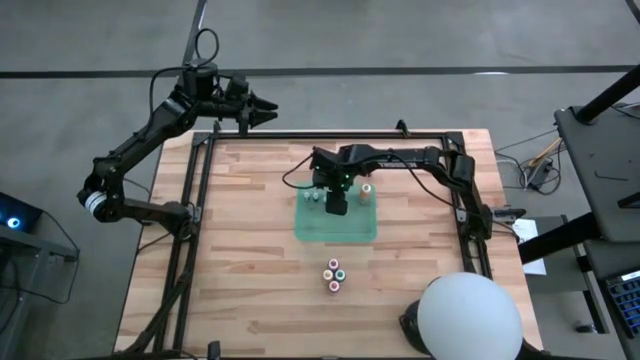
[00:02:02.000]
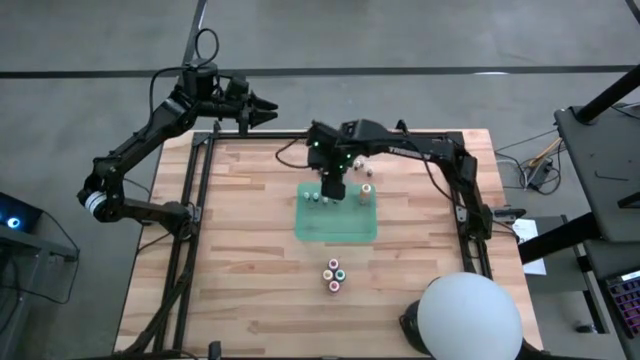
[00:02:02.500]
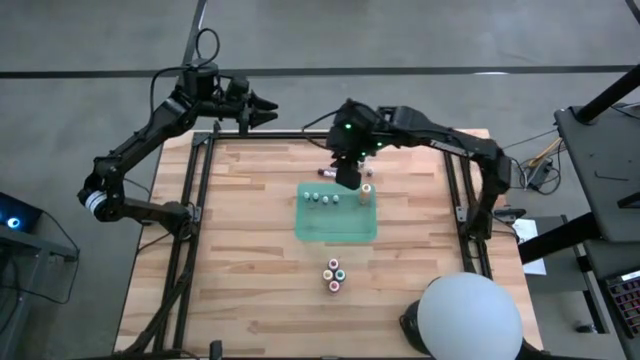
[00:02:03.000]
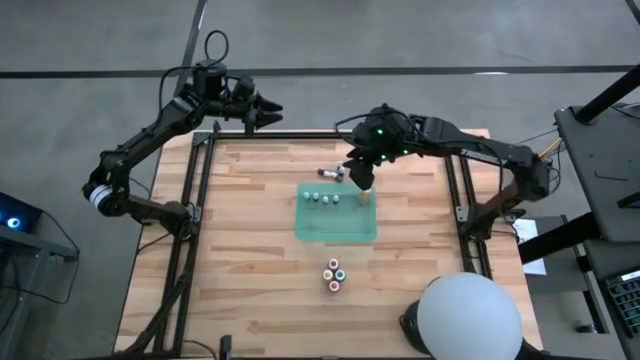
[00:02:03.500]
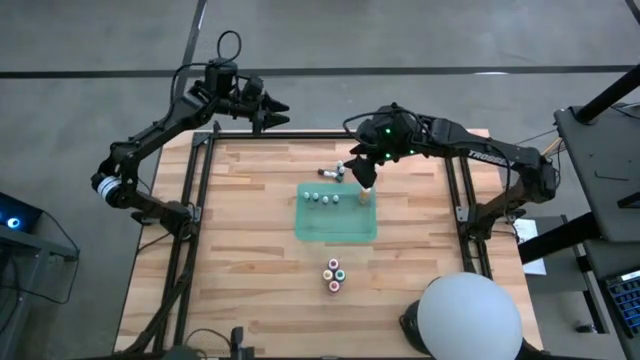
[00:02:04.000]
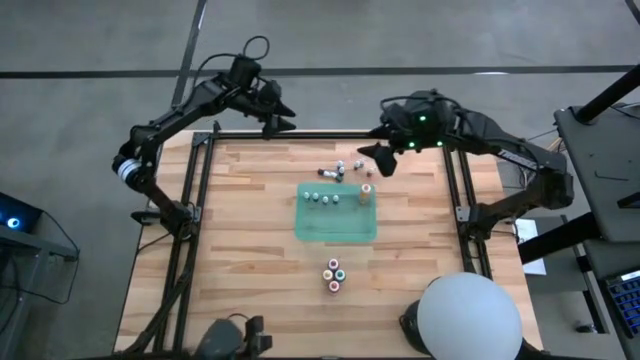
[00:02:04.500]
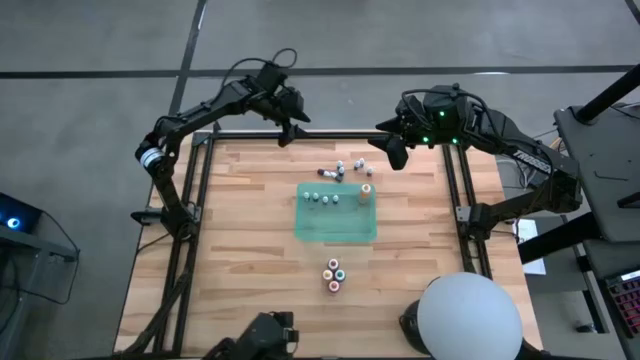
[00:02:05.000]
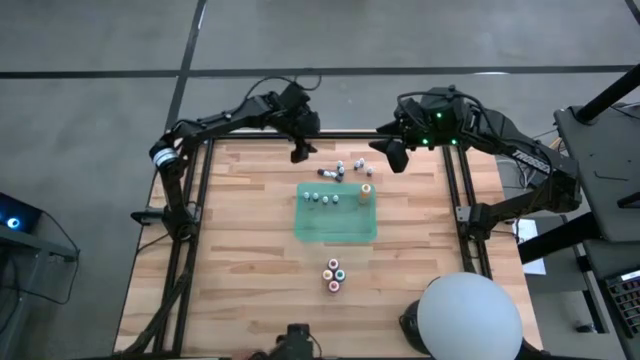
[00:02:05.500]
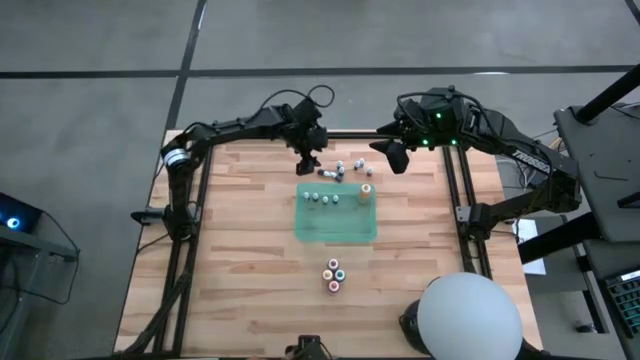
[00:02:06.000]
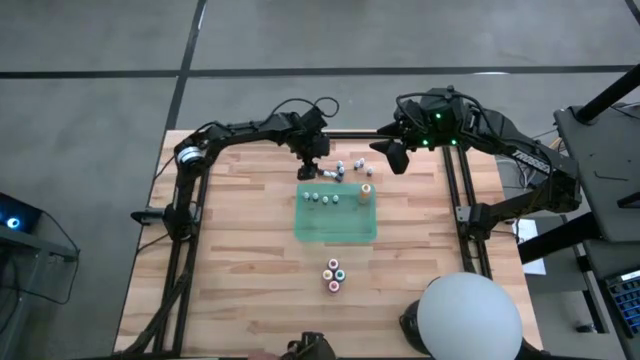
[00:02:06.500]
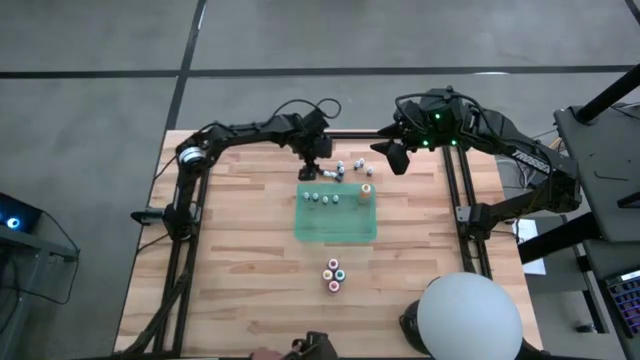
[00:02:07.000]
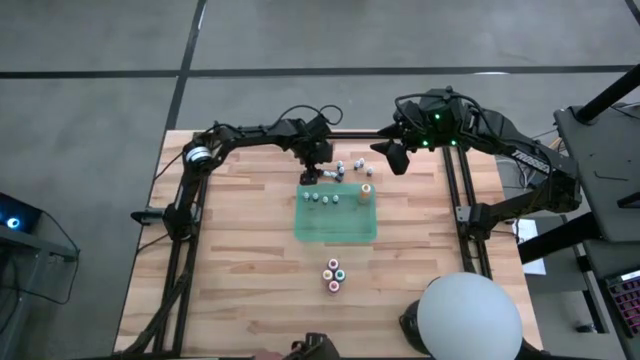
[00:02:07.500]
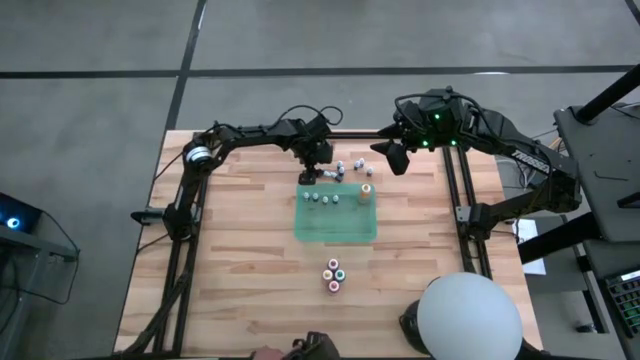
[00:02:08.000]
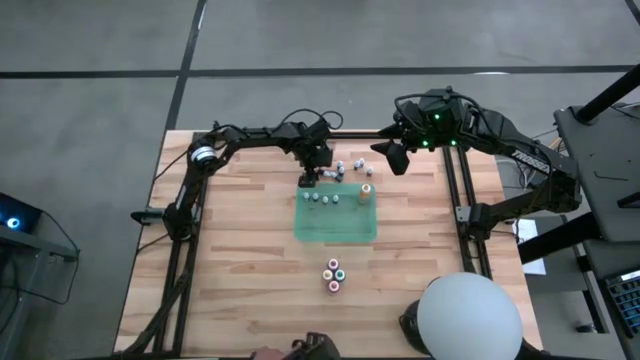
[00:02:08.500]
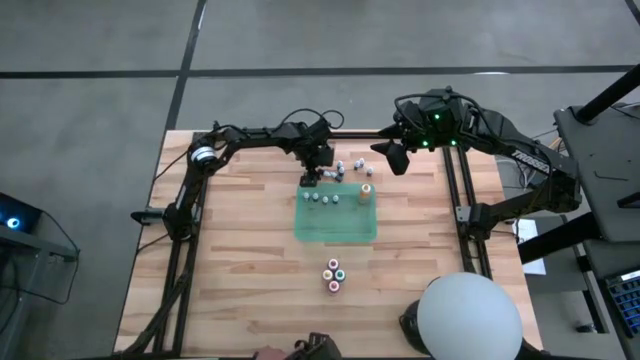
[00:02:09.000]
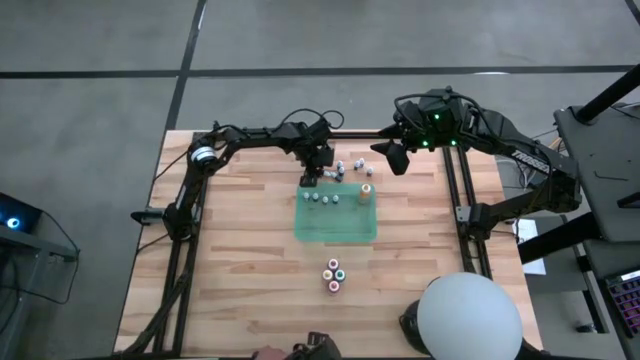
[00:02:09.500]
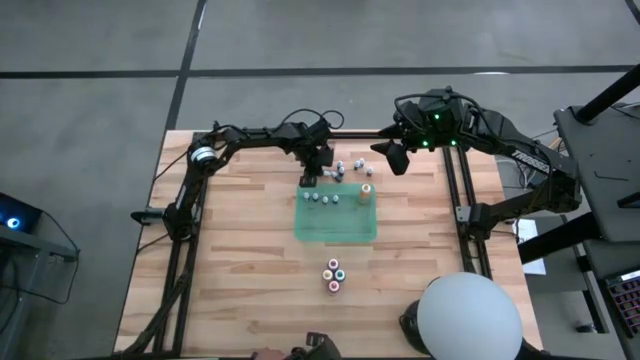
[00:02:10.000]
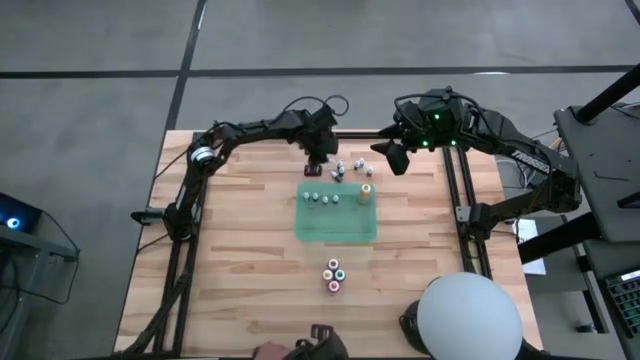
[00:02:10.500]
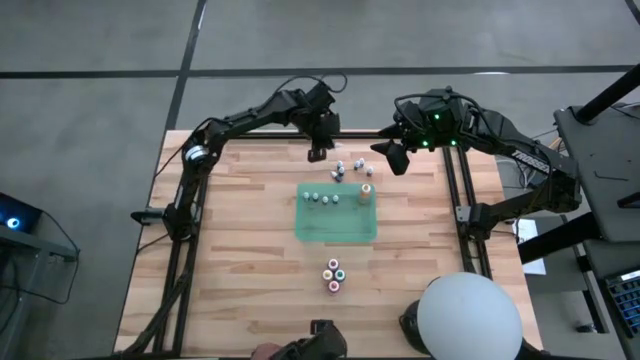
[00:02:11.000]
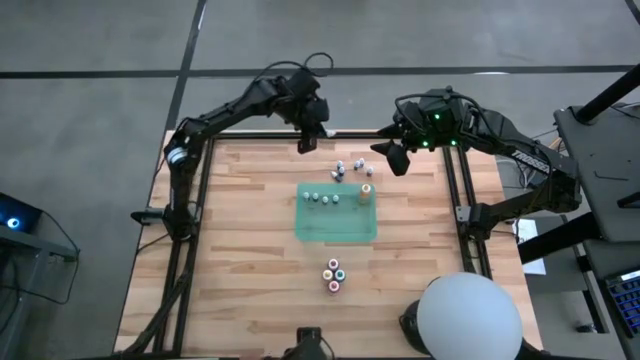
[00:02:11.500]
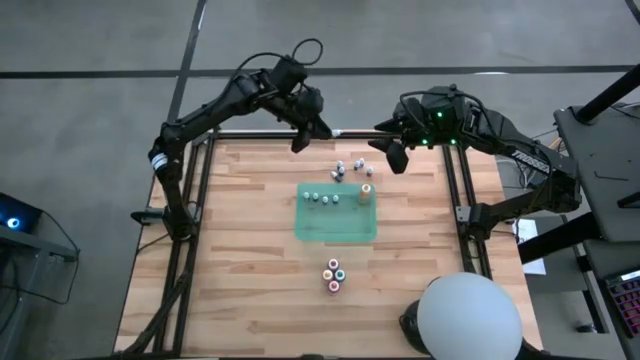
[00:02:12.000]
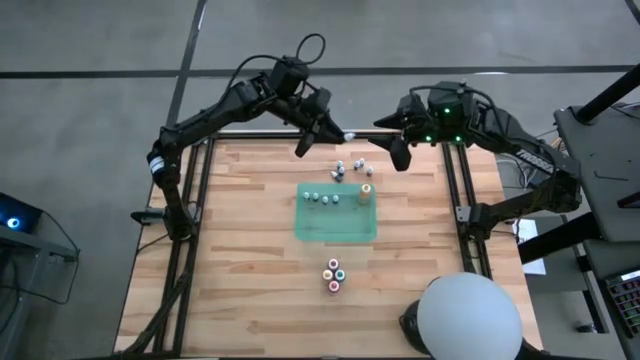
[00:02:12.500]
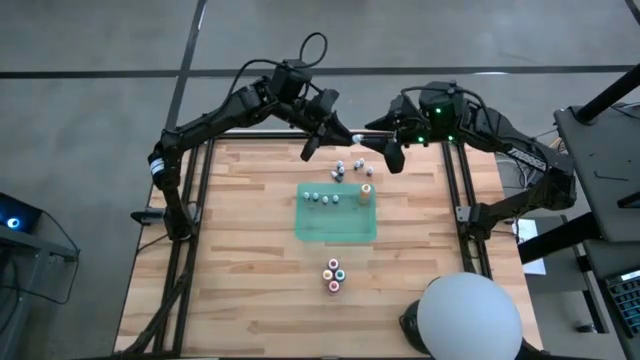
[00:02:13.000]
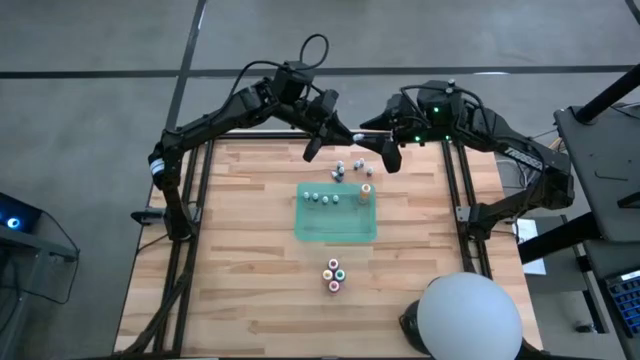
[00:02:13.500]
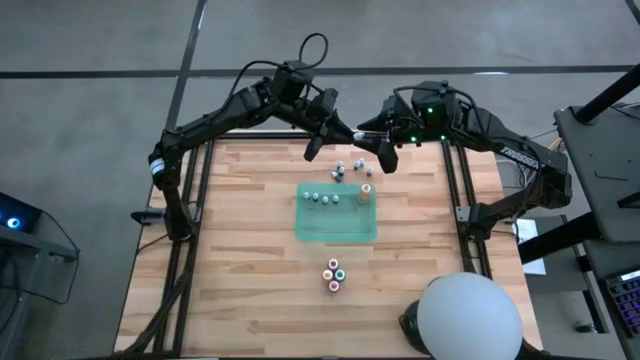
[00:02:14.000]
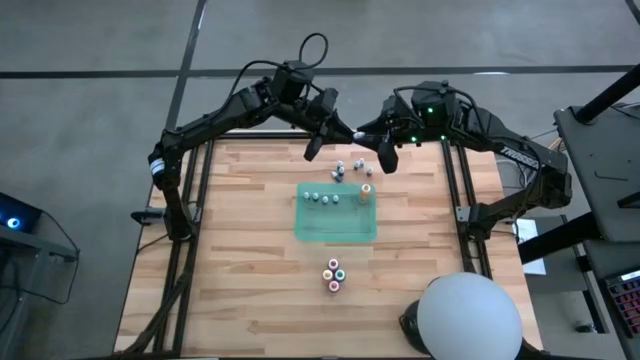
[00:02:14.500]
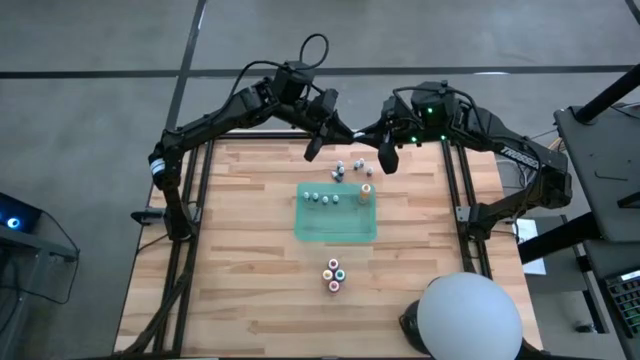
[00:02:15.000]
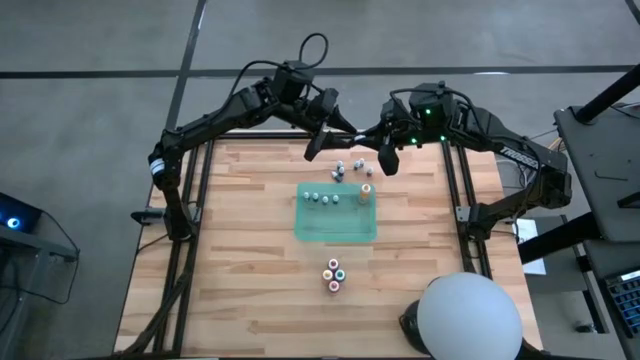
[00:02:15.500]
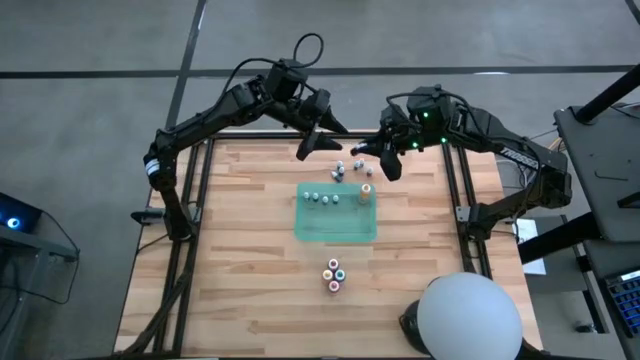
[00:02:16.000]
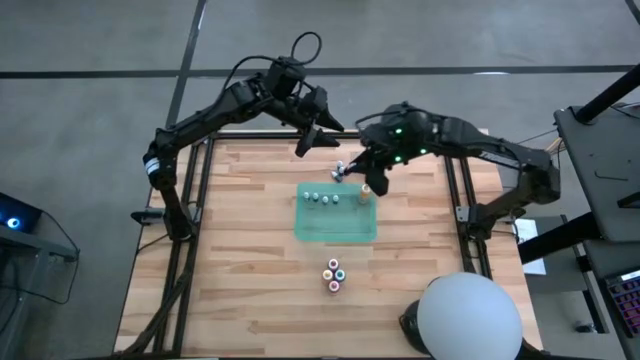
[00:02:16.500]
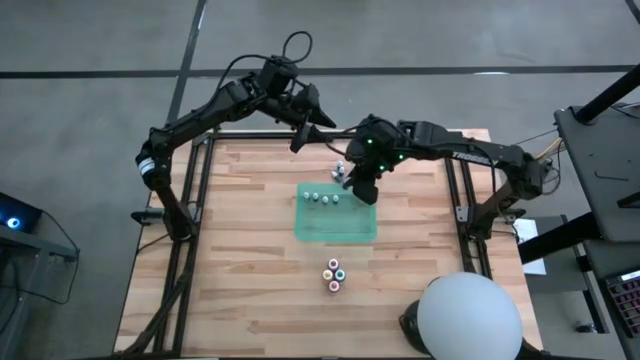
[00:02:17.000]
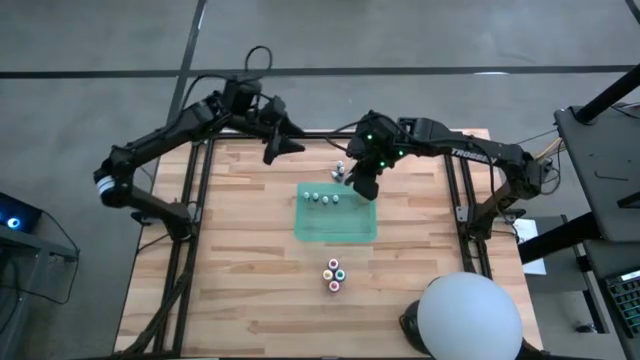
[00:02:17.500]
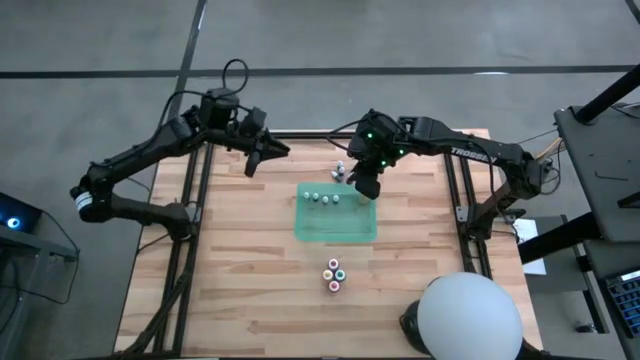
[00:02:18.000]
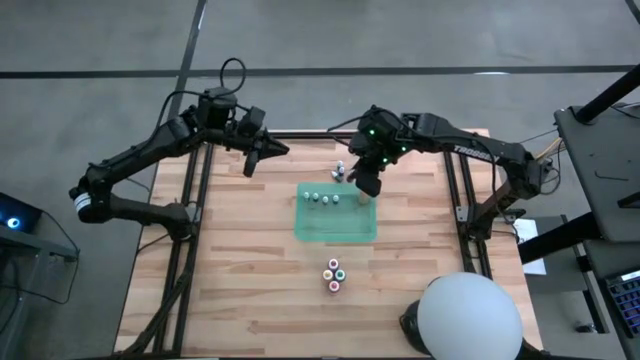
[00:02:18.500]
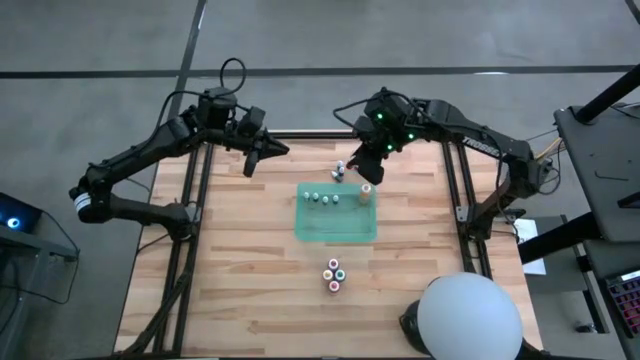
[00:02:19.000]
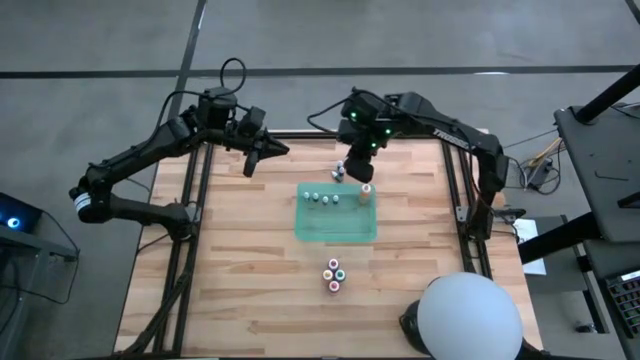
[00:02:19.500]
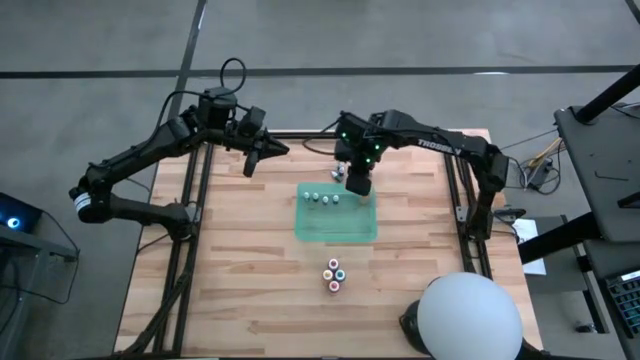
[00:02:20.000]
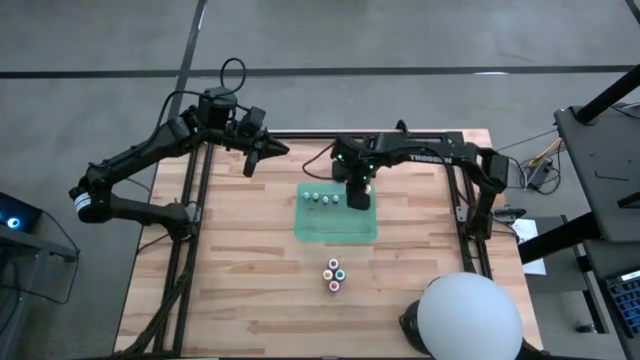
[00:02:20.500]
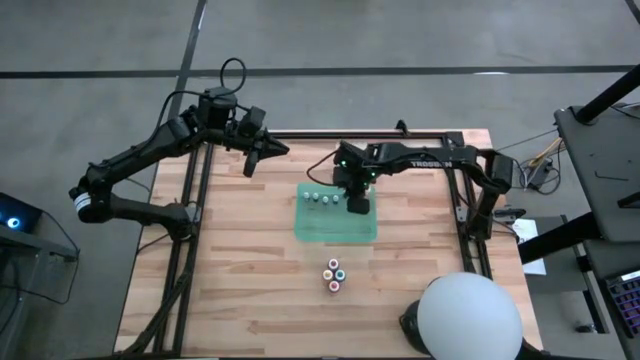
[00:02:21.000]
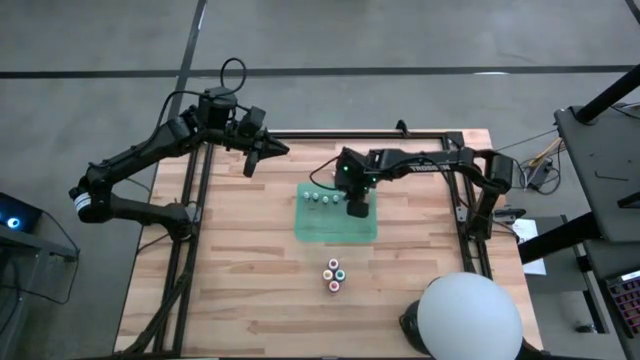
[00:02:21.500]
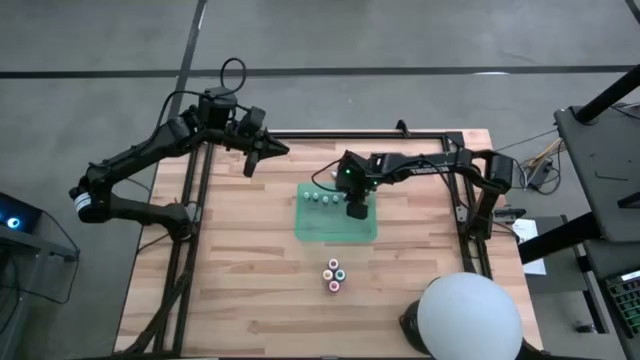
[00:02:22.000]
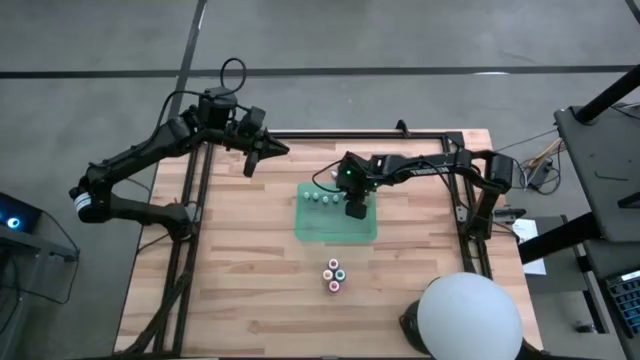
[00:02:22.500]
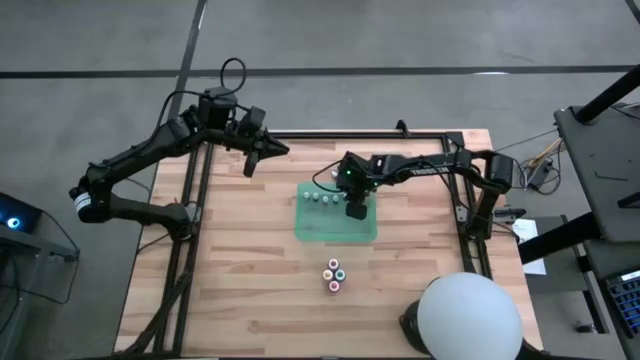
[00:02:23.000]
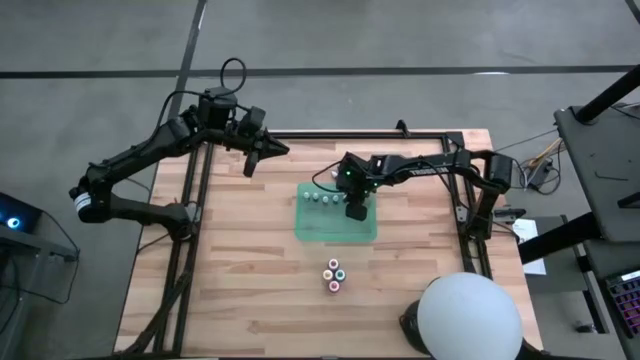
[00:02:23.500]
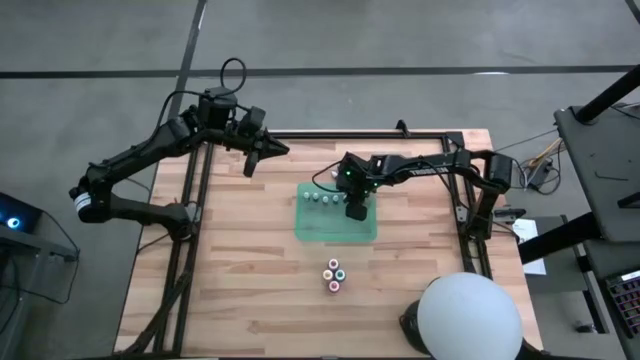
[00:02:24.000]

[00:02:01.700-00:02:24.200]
Task: Pick & Place food coloring
Put the black small food coloring bottle into the green container
